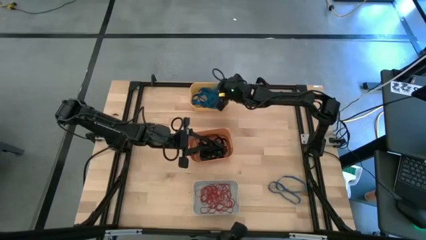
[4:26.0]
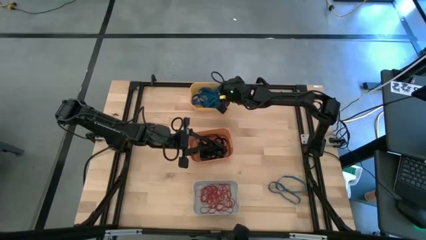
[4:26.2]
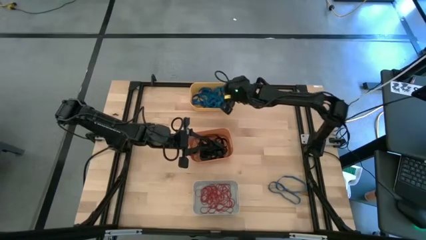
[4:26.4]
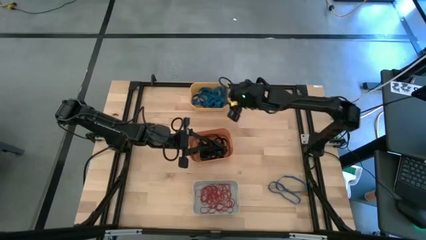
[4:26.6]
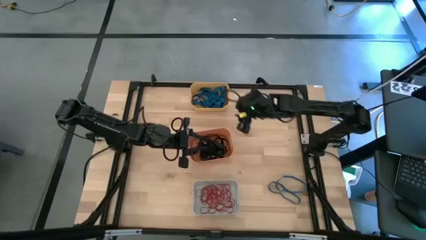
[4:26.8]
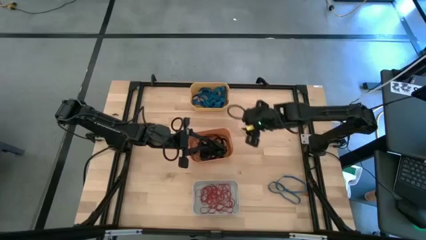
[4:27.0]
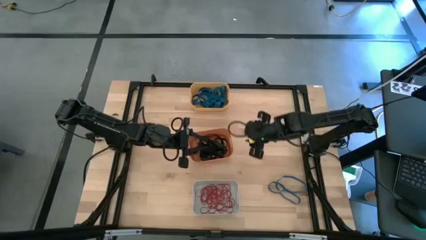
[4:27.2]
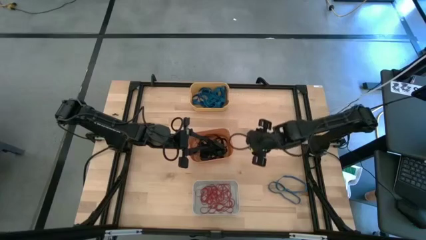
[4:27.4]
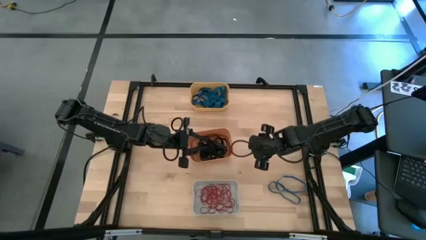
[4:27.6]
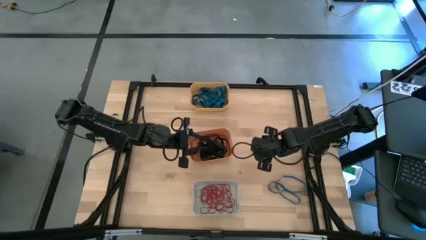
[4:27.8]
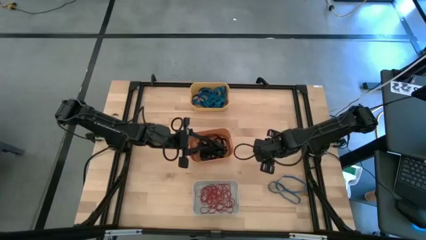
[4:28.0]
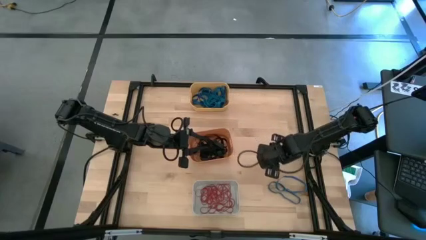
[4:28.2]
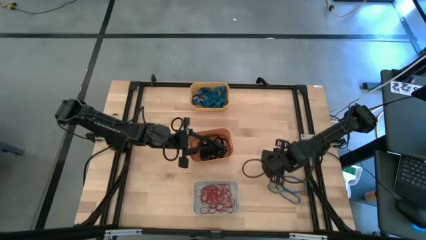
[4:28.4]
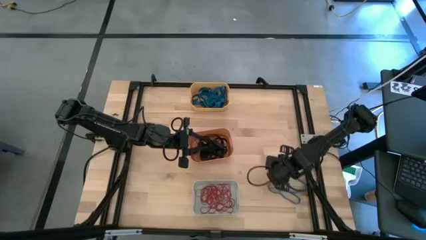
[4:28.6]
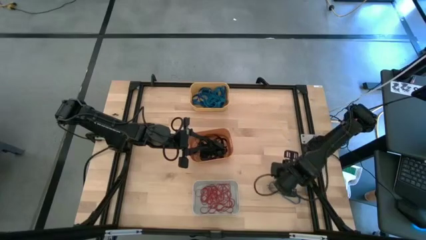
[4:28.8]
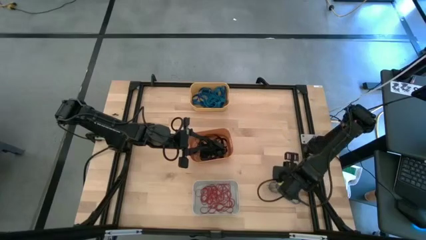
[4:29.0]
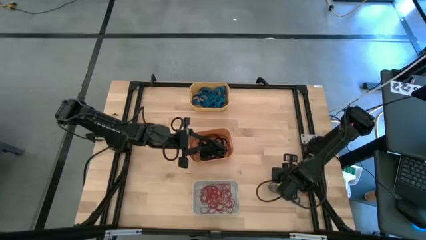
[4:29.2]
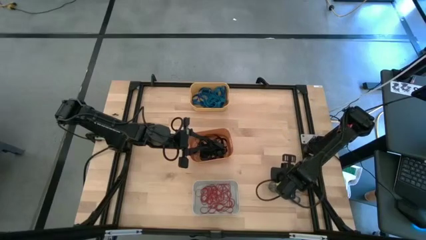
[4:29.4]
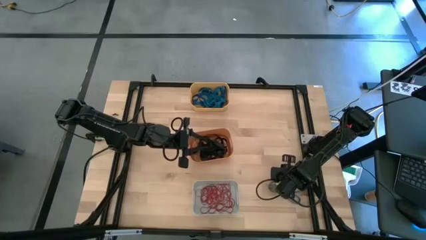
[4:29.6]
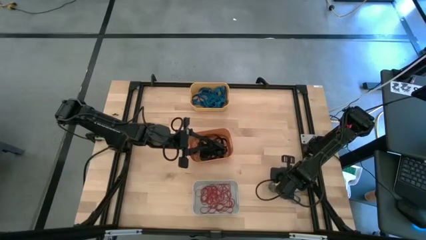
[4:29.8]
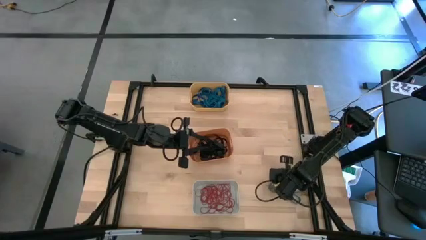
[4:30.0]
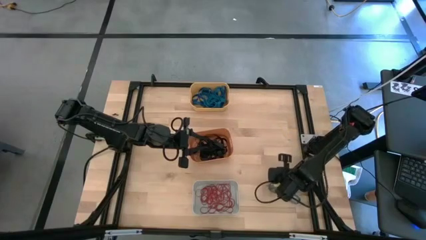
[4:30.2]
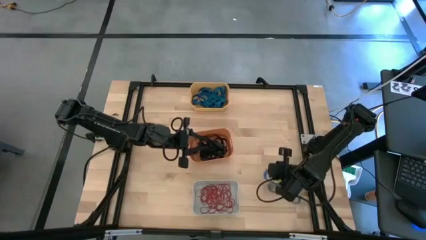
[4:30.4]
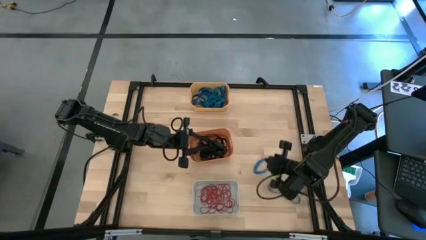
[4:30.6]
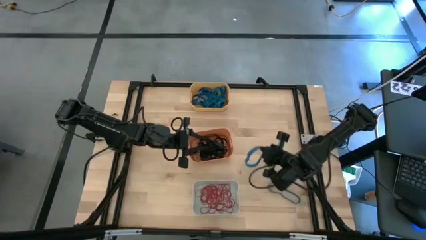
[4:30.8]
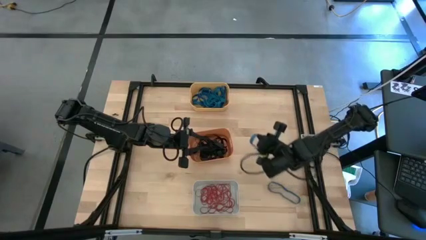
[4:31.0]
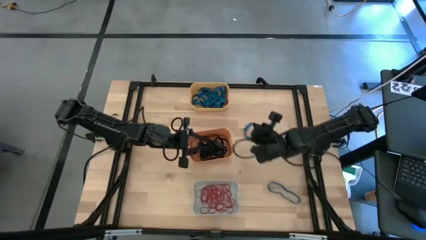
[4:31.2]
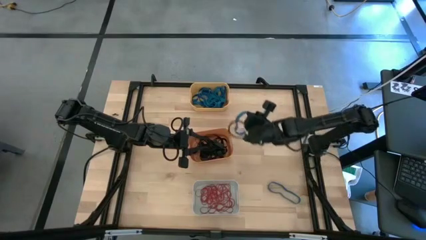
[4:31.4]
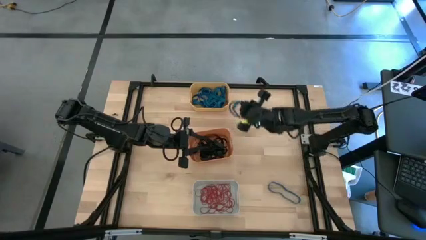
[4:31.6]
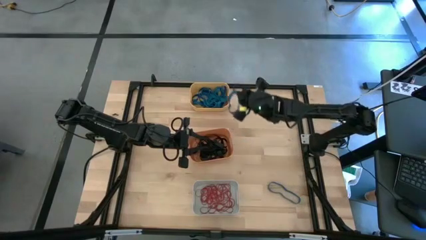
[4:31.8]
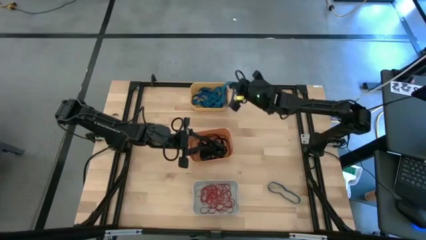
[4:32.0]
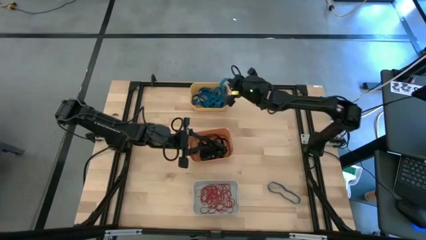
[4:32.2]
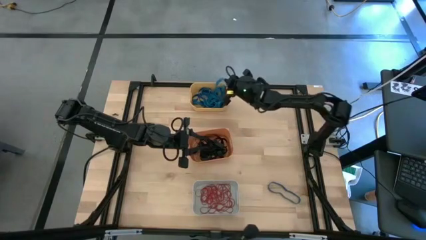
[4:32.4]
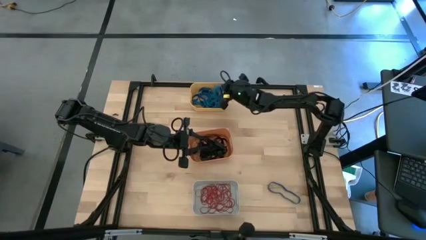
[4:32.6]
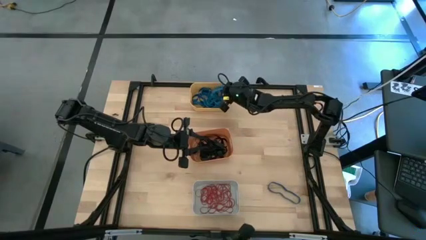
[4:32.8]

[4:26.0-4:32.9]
Task: Sort rubber bands into baskets
Put the blue rubber band in the yellow bin

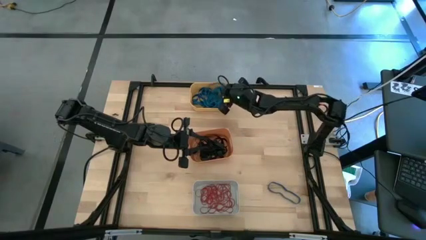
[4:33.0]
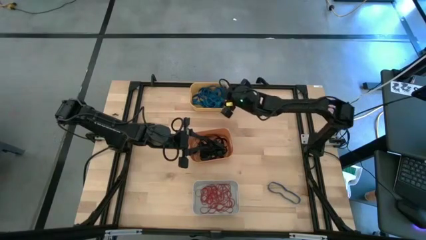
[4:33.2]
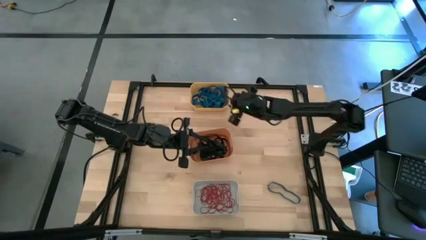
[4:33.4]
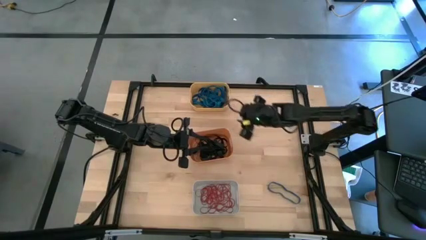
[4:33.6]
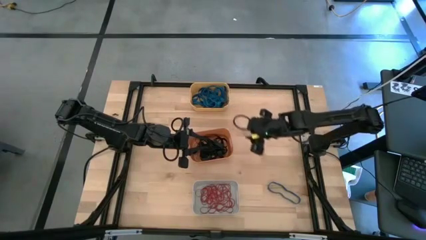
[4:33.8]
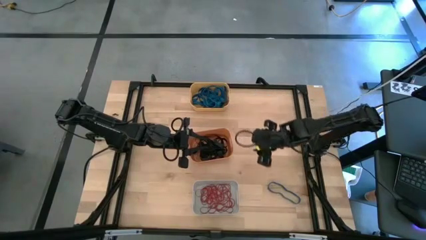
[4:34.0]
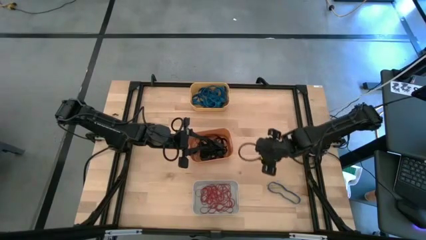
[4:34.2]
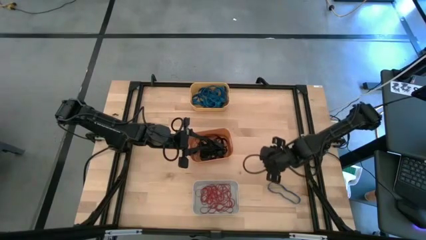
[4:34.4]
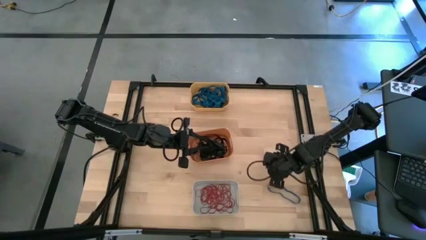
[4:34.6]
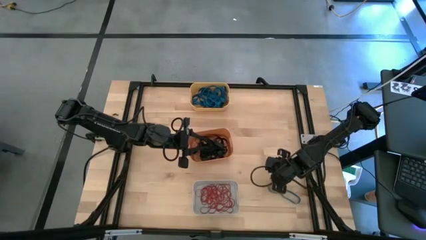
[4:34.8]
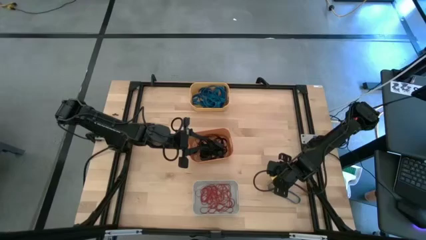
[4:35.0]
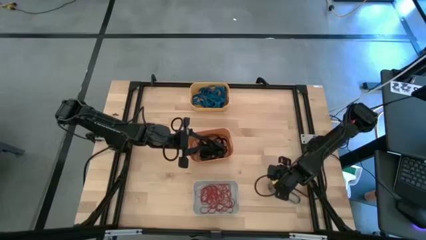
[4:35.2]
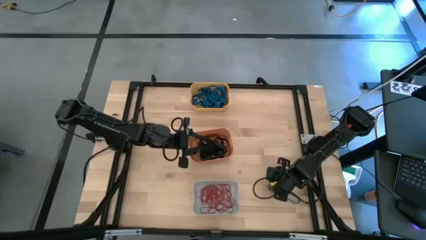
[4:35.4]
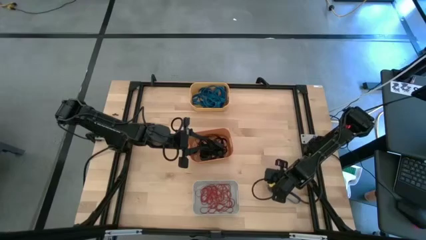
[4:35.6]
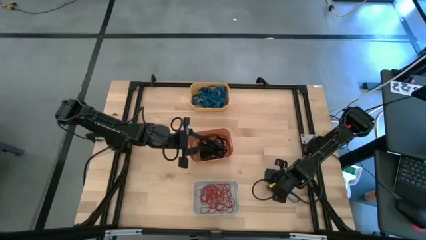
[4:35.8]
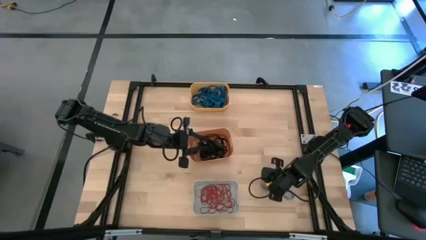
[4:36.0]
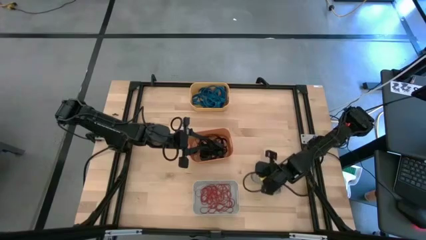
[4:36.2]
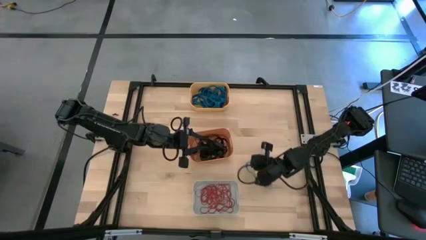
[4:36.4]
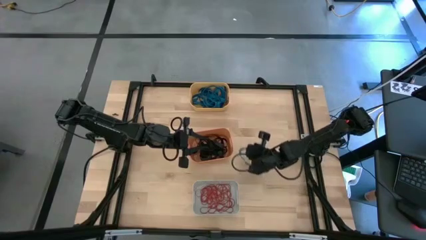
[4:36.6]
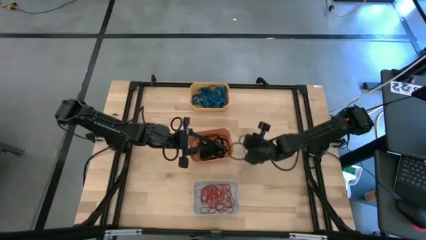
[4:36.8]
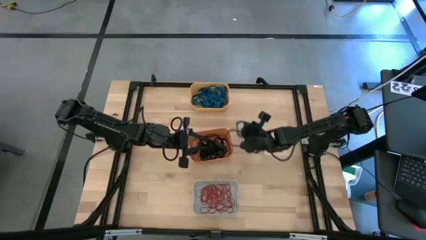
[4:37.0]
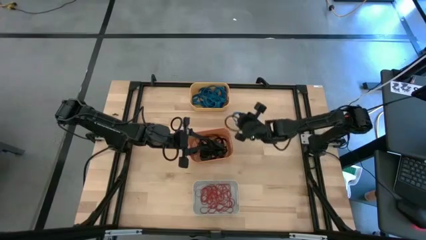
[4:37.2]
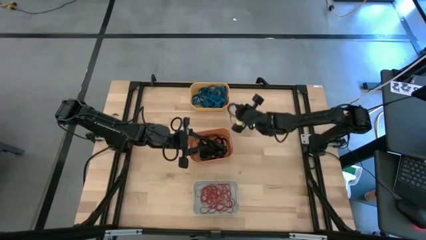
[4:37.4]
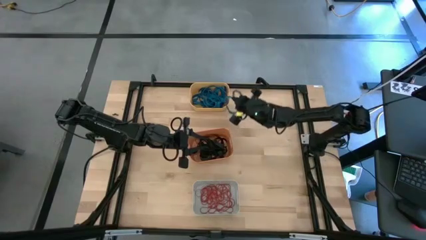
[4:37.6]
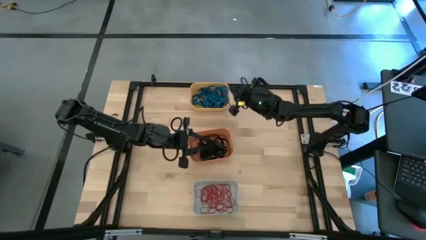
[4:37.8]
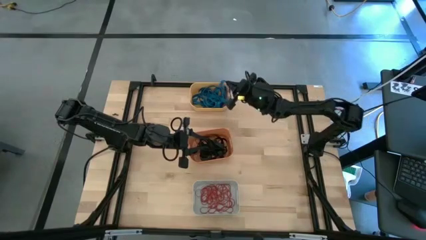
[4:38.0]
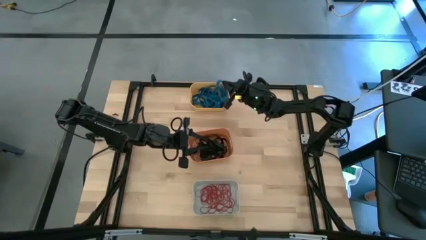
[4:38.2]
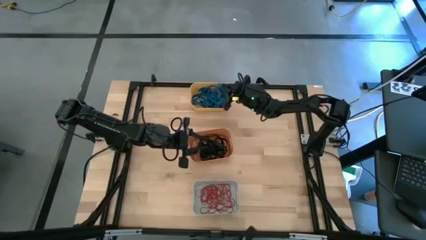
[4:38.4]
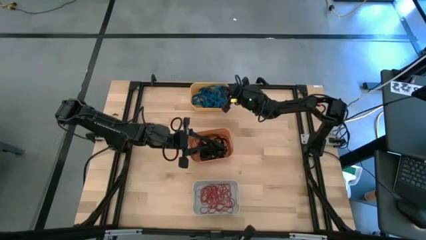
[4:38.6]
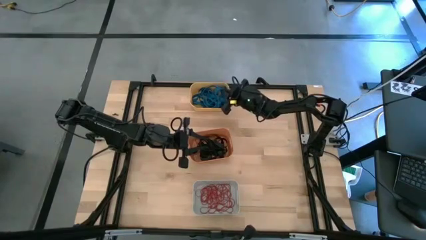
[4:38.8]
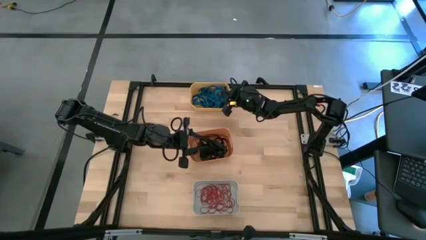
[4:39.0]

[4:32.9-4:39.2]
Put the blue rubber band in the yellow bin

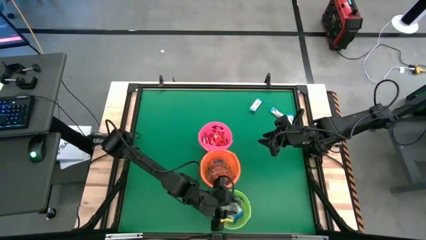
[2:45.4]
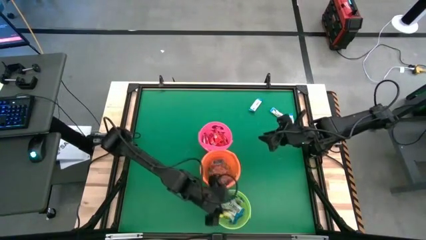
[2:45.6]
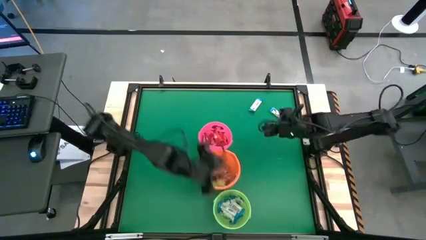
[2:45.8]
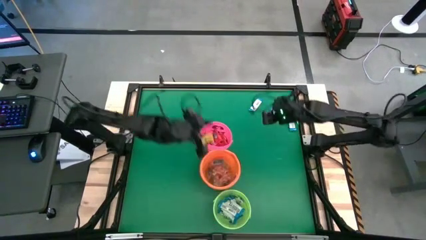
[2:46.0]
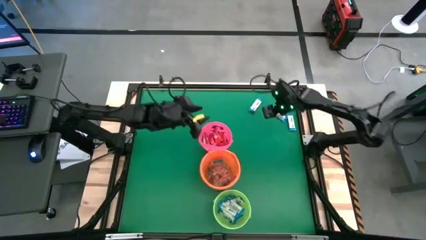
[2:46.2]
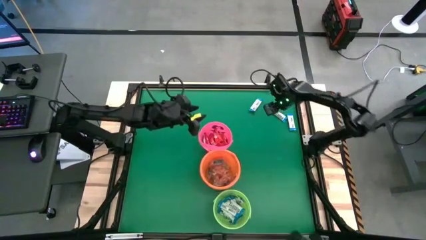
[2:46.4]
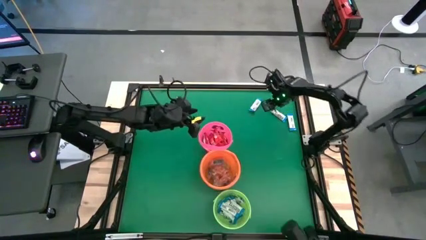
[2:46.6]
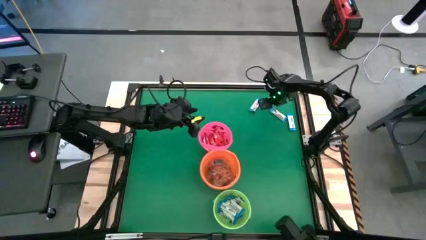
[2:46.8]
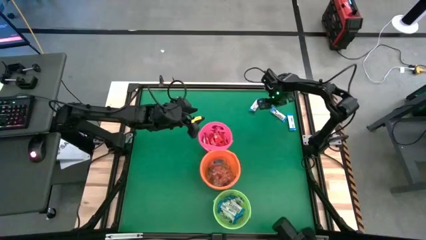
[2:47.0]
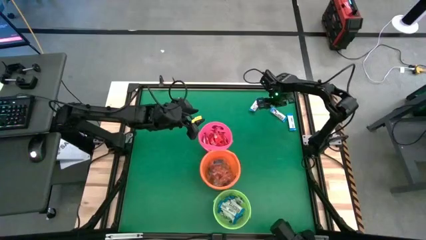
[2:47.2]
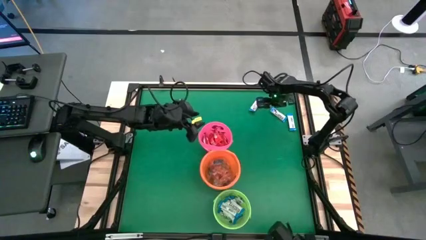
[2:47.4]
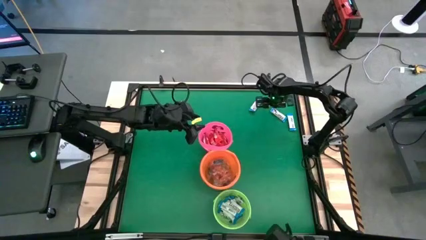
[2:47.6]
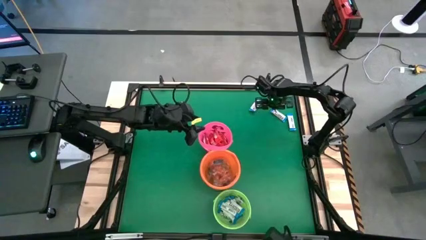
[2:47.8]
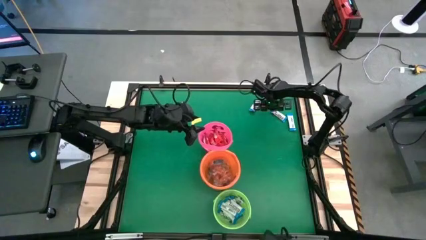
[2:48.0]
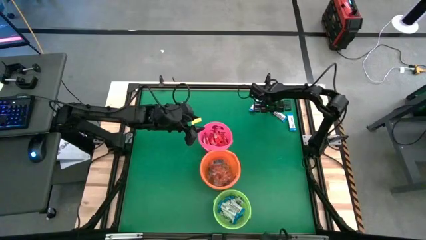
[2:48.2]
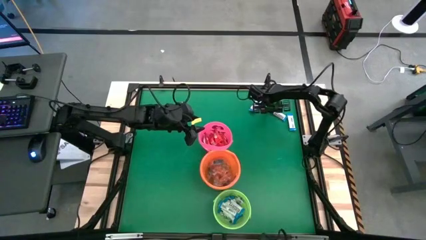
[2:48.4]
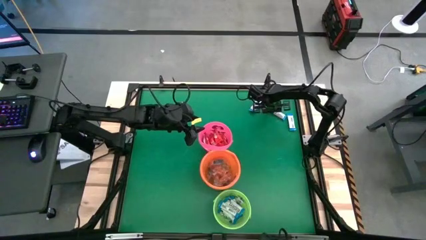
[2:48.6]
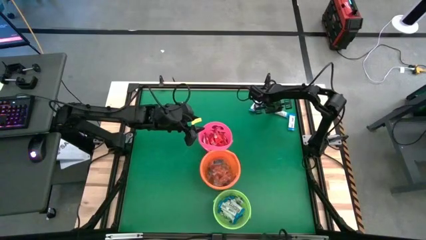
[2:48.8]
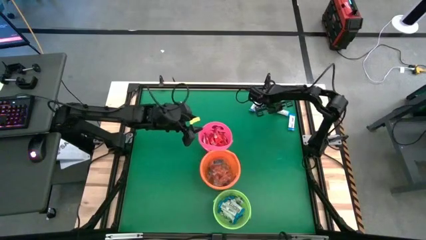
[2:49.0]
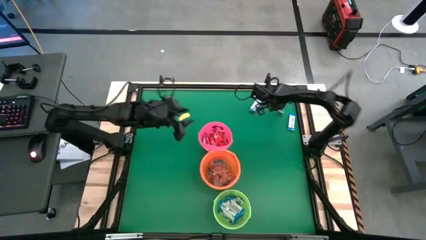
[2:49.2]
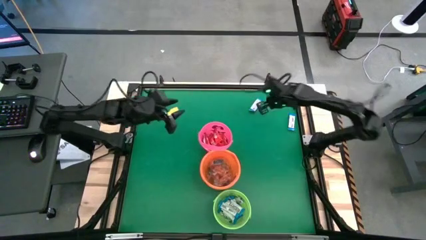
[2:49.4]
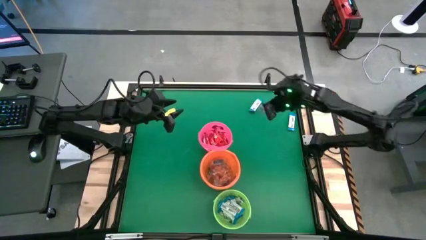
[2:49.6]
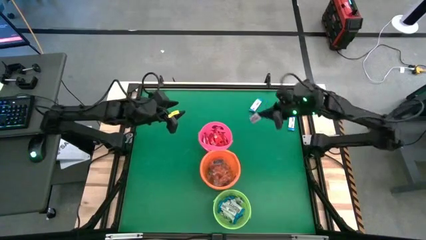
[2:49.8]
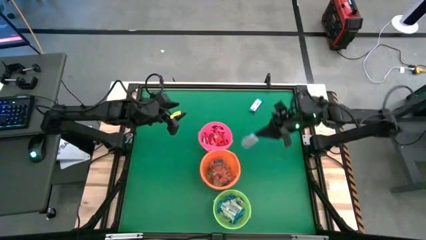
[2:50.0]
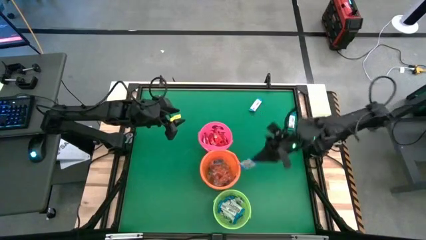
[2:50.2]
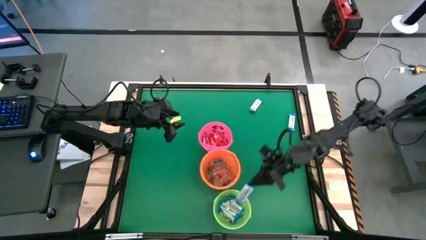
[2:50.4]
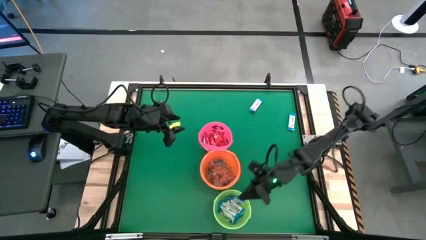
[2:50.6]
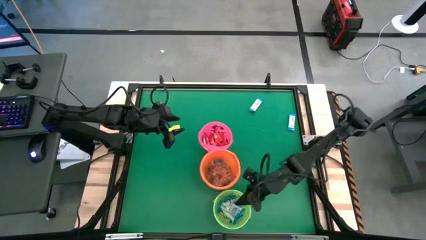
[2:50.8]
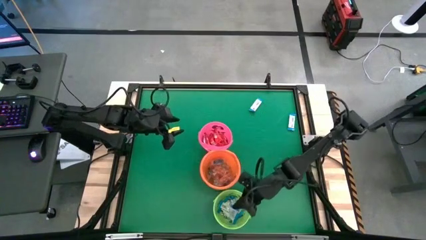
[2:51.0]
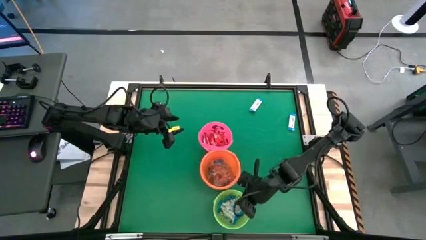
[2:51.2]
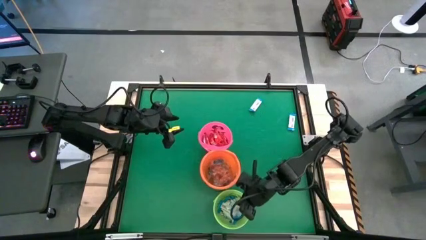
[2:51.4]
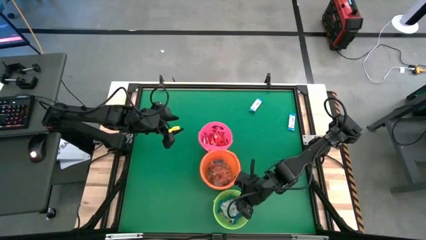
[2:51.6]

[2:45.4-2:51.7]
Task: Sort candy by brand, put in halloween buckets
Put the white chocolate into the green bucket
